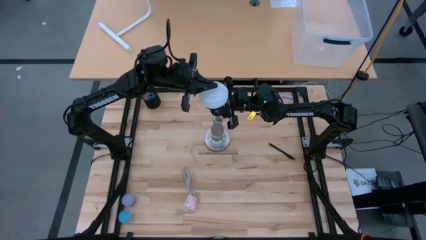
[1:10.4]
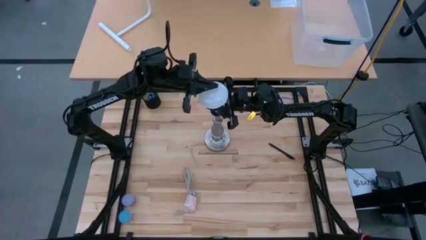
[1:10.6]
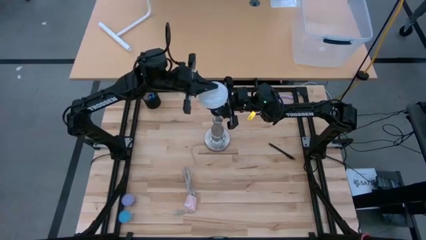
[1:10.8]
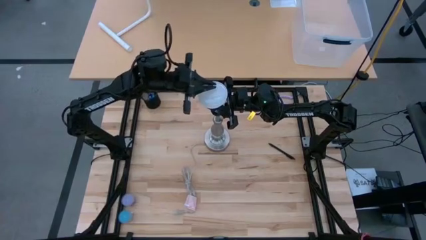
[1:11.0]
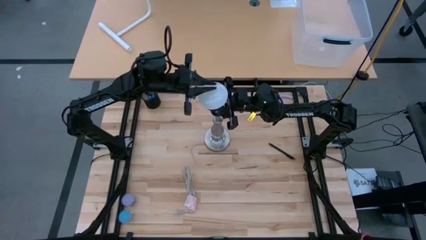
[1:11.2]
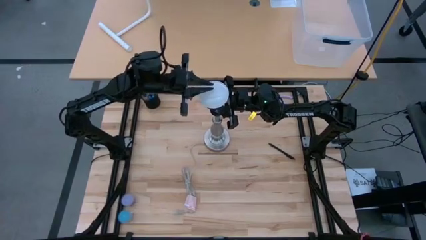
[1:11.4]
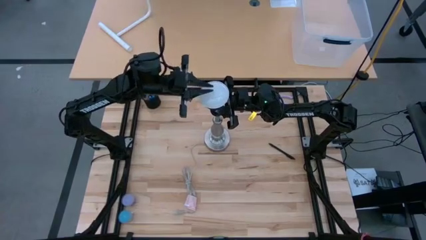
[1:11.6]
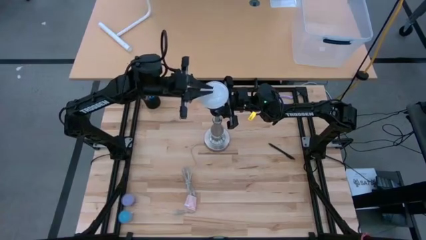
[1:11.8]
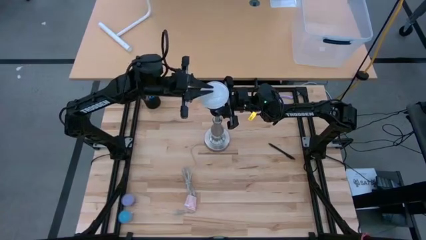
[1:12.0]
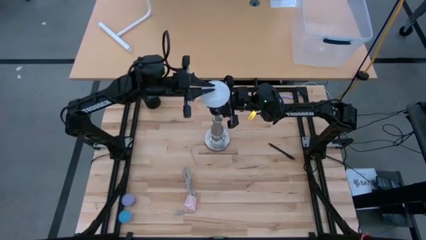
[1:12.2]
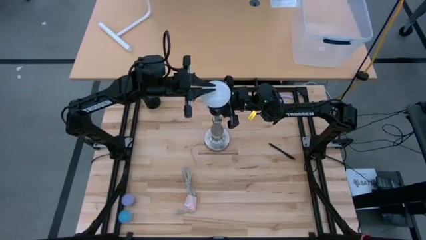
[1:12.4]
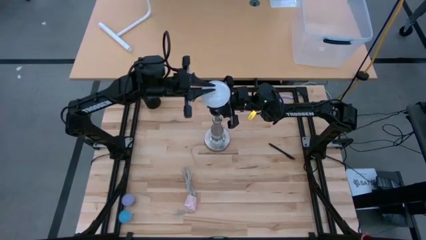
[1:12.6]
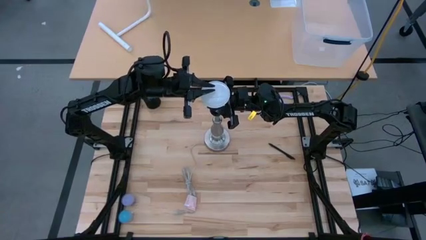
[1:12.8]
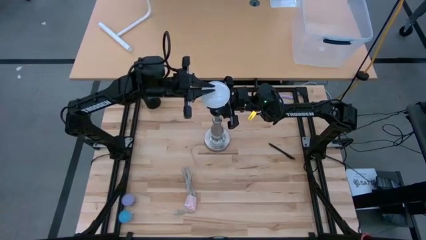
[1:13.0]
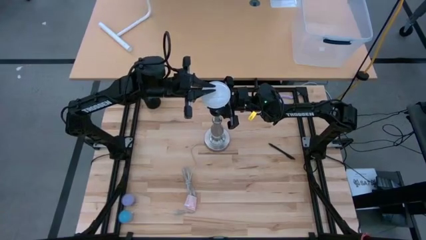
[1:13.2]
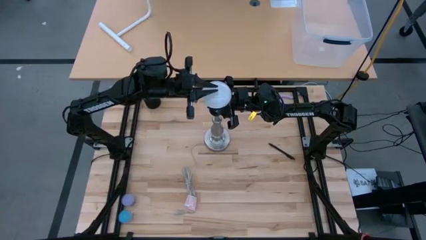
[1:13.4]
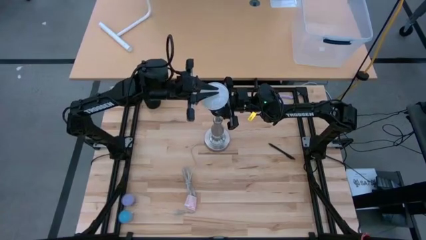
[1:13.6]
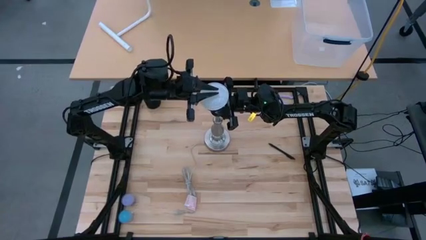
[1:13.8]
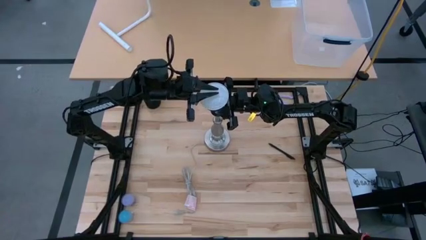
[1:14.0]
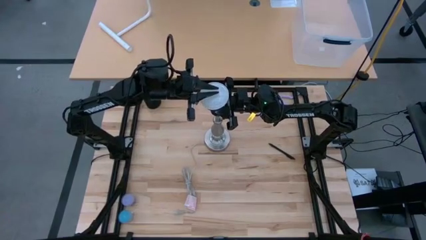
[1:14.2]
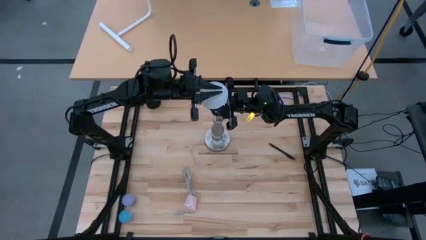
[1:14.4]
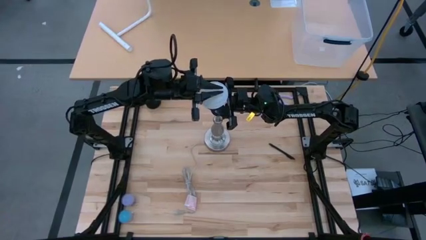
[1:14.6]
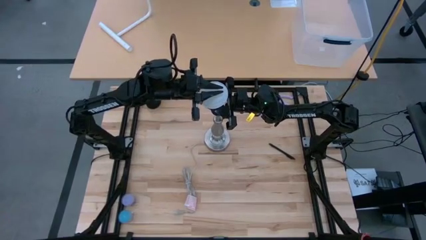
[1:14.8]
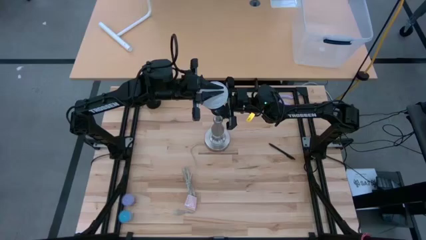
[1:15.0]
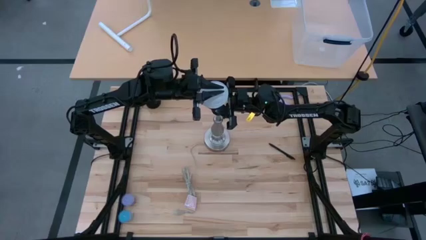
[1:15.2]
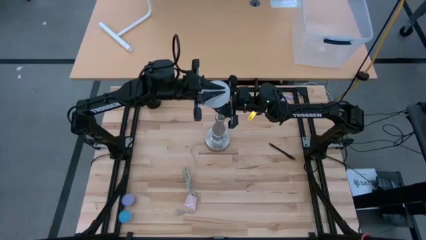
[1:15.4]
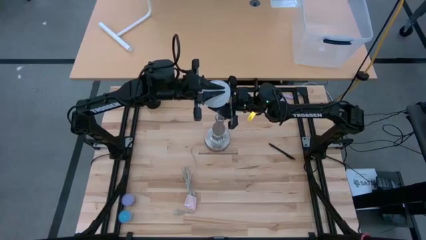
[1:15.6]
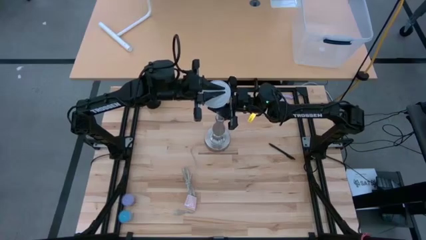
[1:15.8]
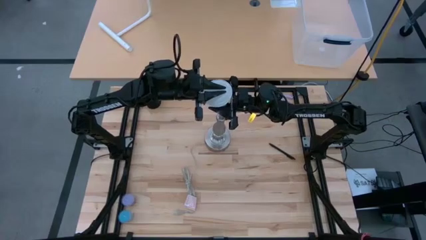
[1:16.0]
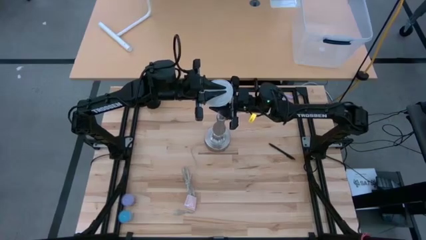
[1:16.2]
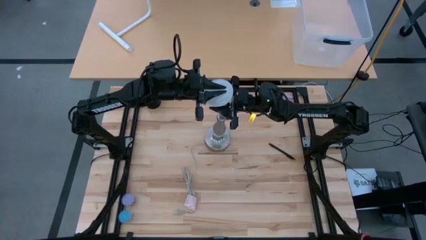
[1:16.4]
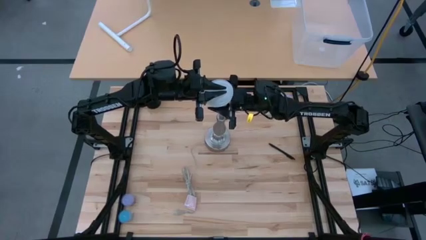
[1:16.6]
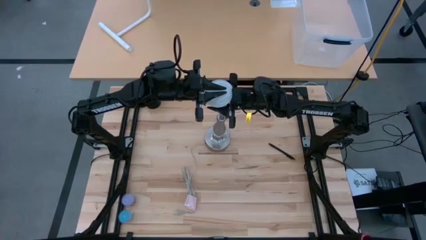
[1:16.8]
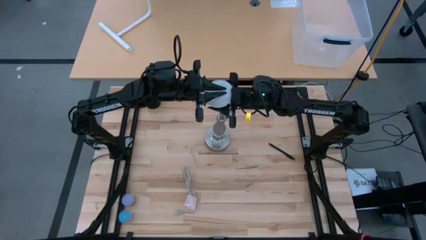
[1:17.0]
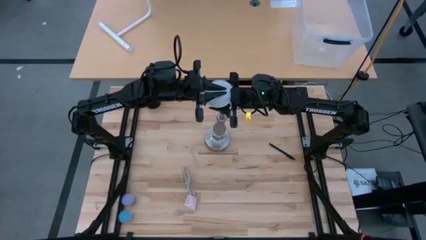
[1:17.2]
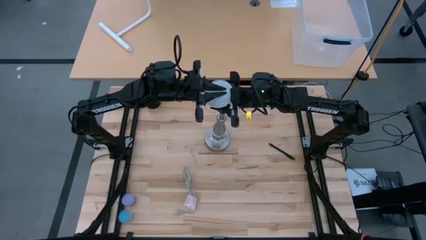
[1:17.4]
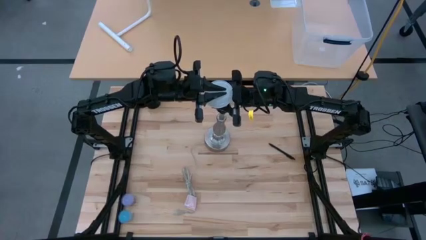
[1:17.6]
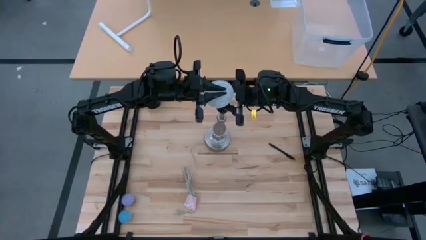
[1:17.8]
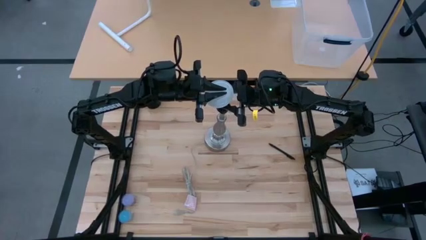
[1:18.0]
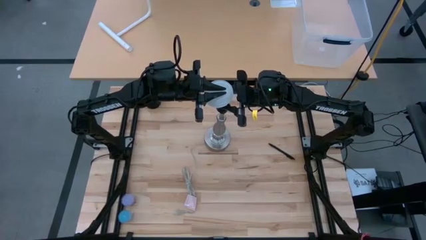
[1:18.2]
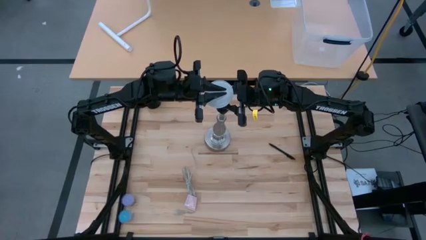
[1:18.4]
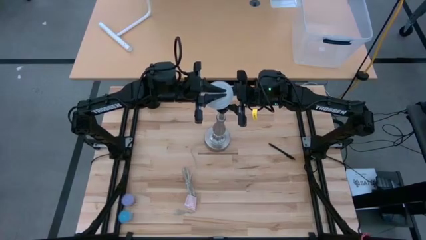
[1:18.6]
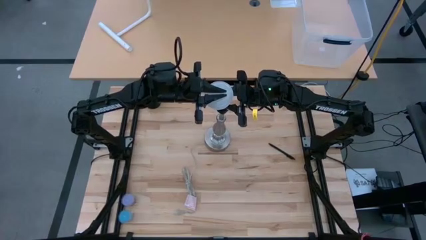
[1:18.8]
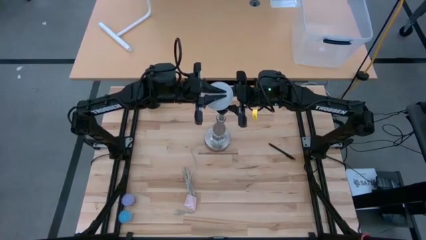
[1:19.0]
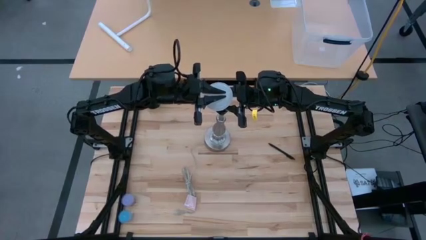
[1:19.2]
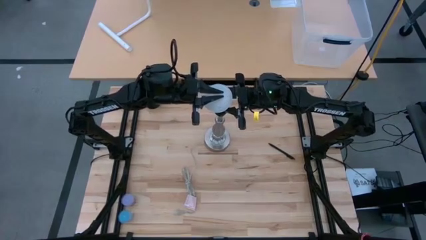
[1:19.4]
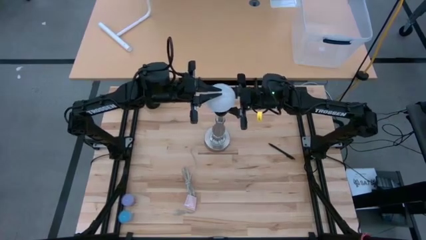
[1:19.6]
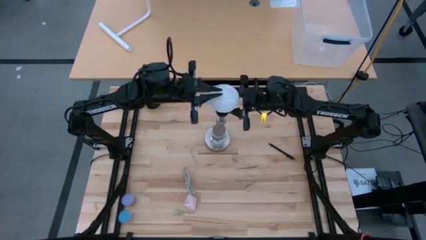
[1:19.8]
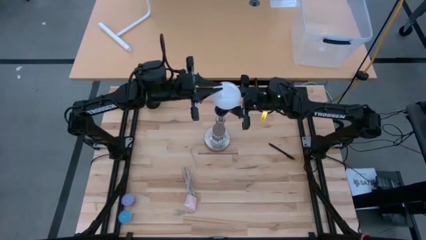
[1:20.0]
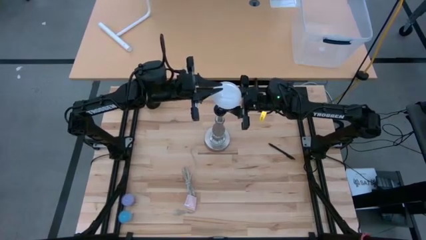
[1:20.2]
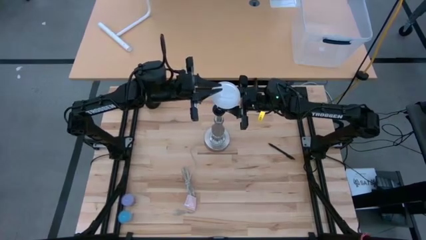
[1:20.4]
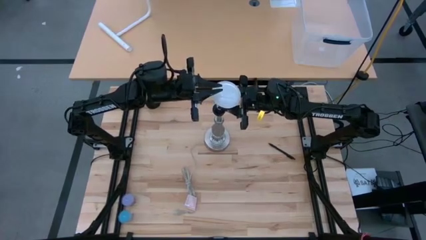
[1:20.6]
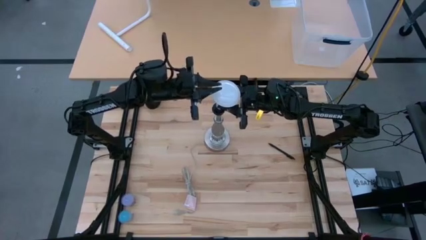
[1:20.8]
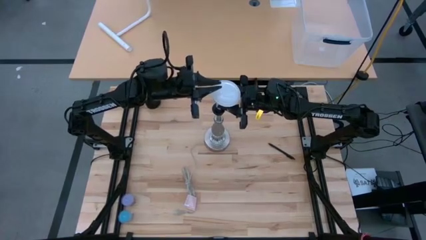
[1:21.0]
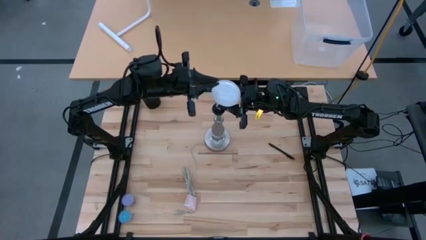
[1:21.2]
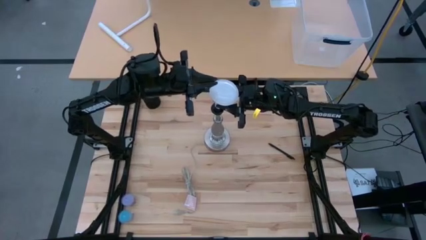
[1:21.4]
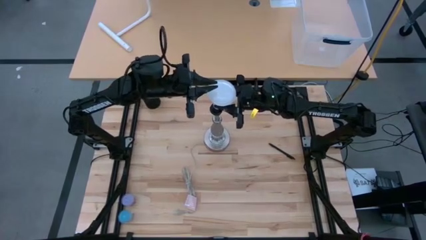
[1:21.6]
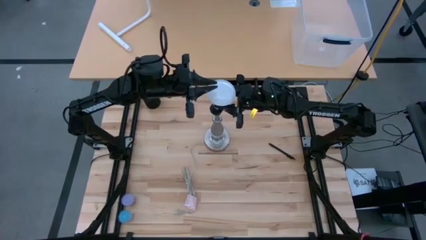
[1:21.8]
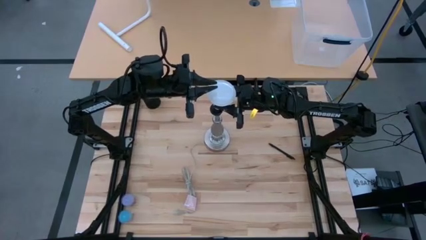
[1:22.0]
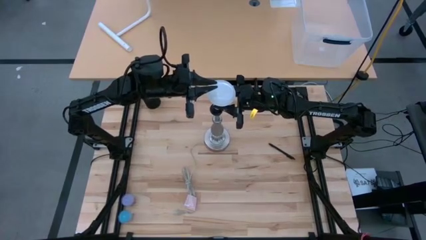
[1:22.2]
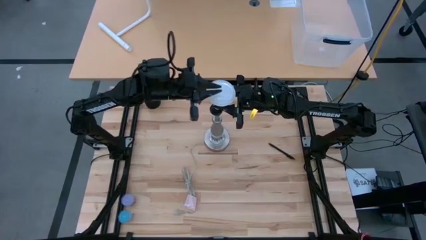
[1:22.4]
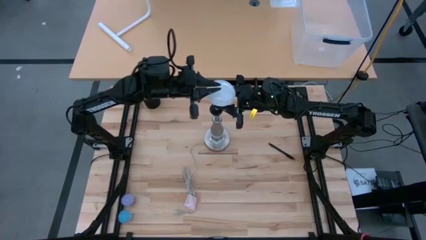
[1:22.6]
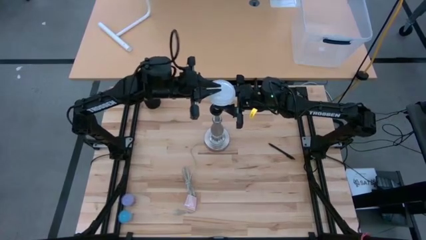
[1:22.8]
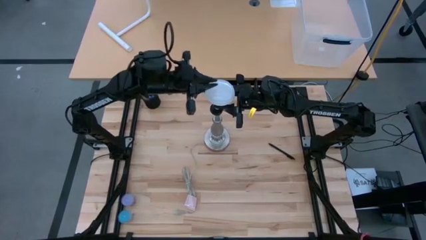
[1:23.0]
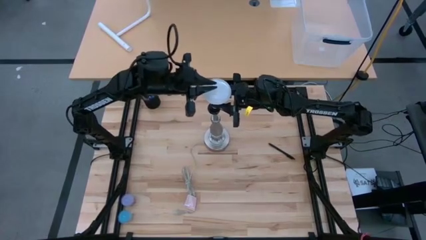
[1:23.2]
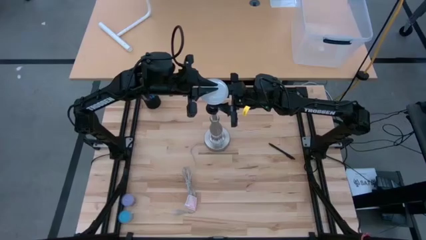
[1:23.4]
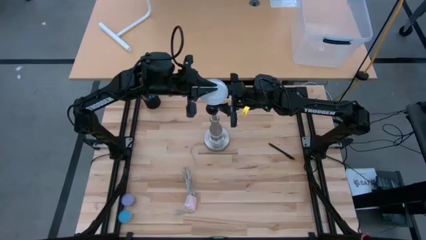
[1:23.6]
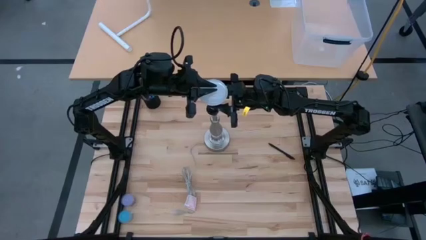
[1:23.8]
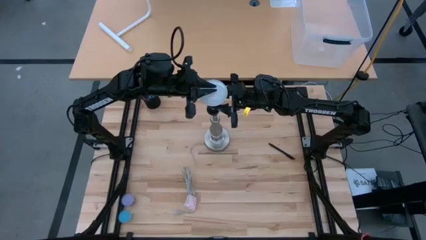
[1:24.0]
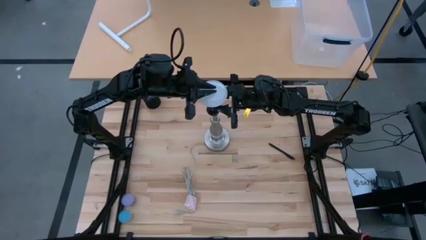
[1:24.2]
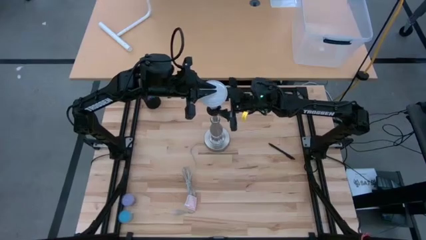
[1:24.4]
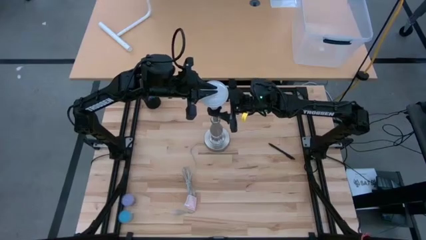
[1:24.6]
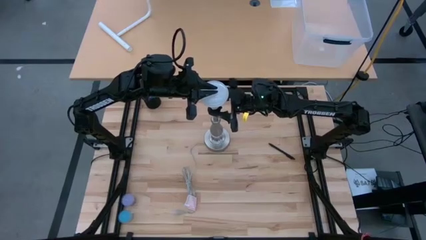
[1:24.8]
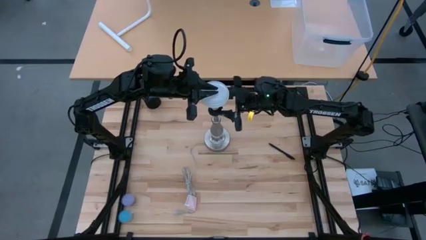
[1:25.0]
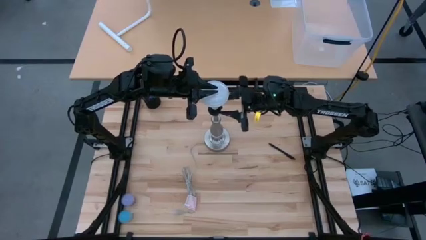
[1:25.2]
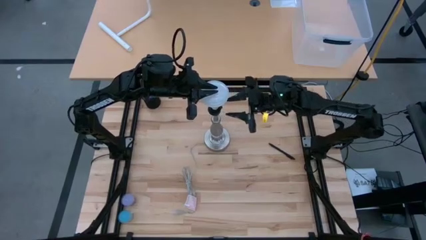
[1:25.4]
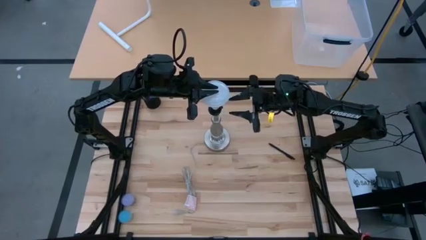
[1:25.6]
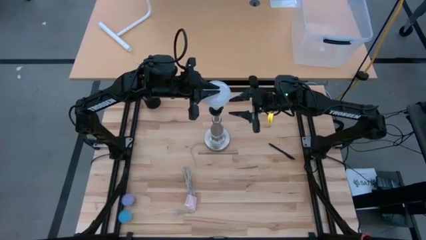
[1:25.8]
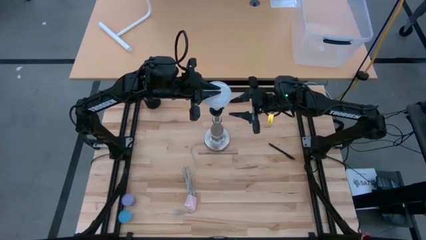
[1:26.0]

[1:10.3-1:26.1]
Task: Screw lightbulb
Insert the lightbulb into the lamp
